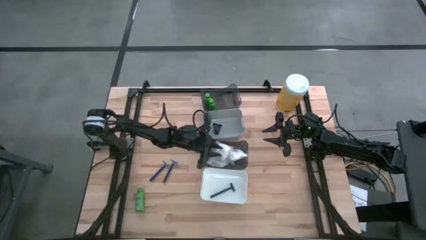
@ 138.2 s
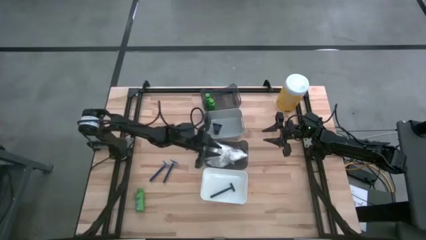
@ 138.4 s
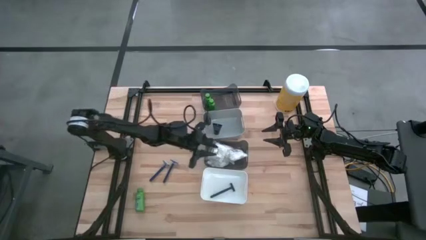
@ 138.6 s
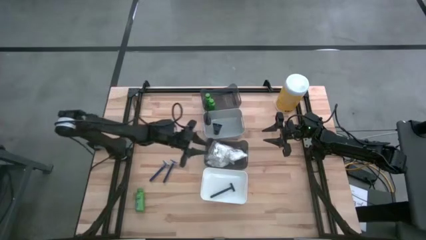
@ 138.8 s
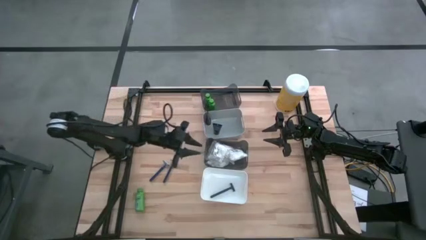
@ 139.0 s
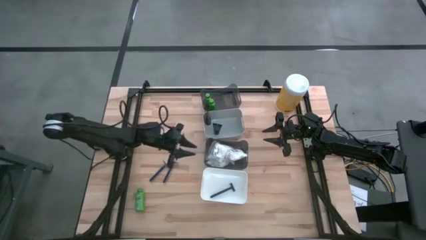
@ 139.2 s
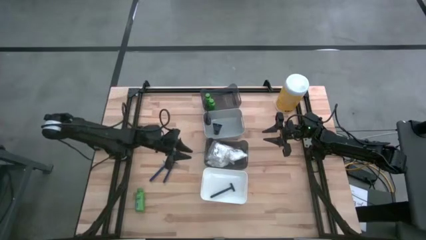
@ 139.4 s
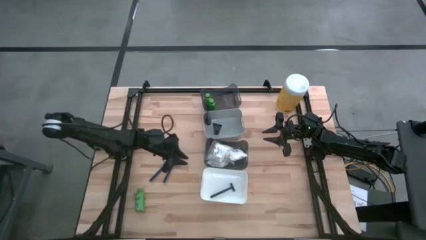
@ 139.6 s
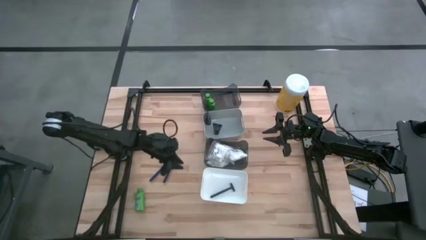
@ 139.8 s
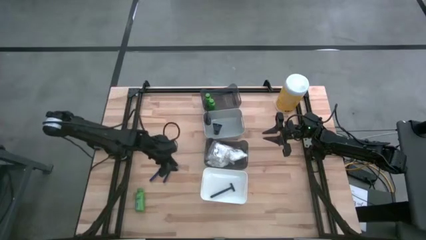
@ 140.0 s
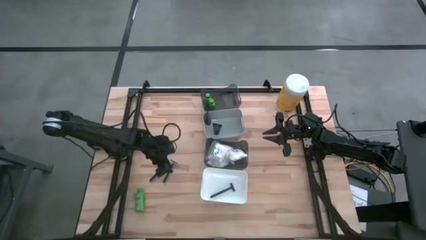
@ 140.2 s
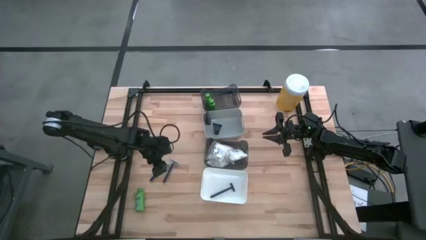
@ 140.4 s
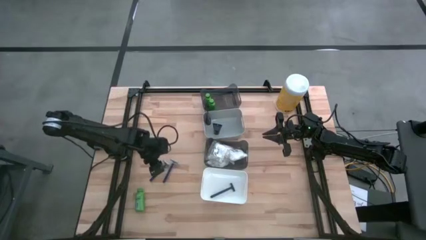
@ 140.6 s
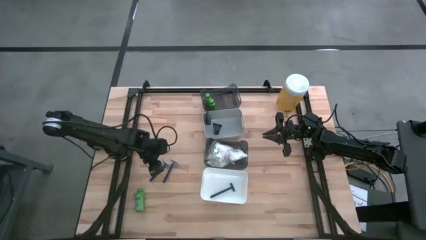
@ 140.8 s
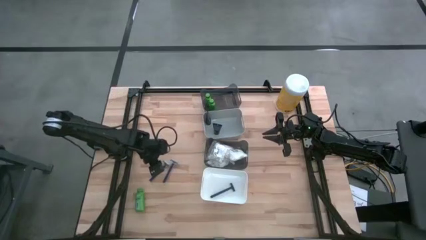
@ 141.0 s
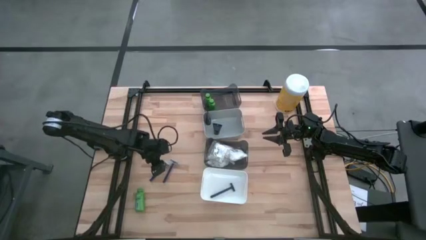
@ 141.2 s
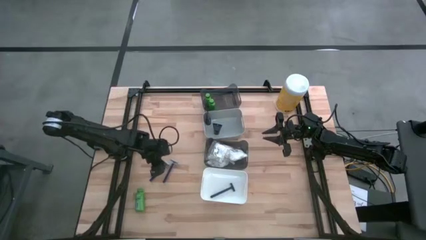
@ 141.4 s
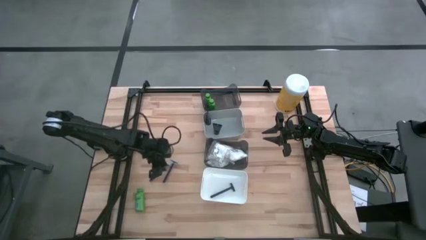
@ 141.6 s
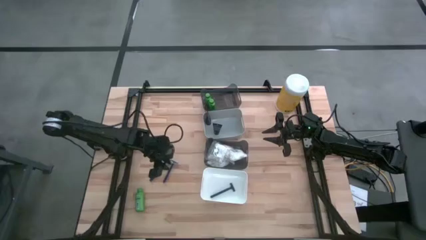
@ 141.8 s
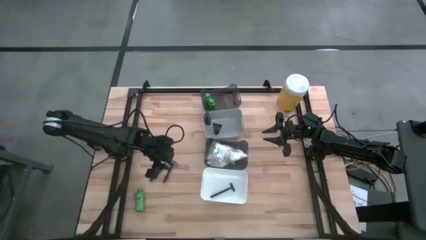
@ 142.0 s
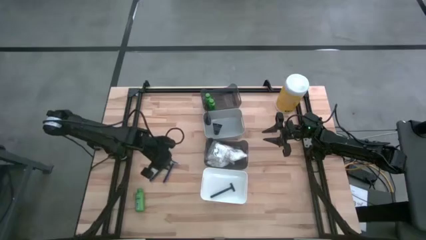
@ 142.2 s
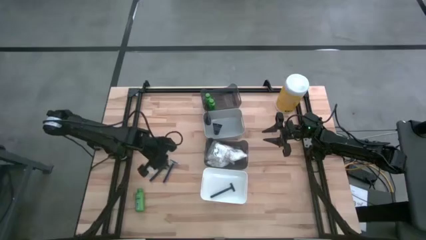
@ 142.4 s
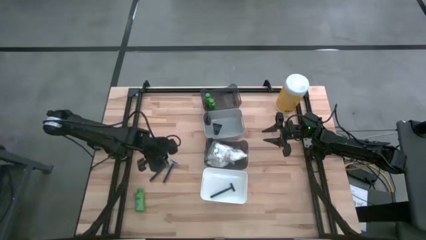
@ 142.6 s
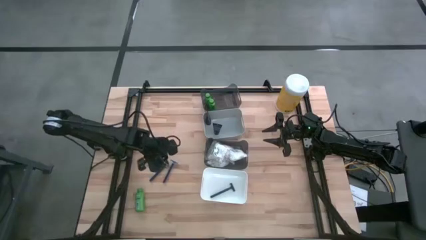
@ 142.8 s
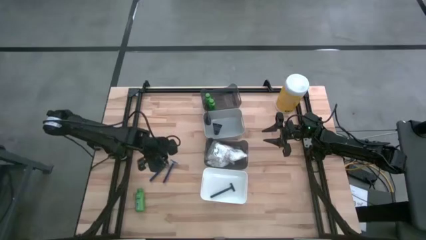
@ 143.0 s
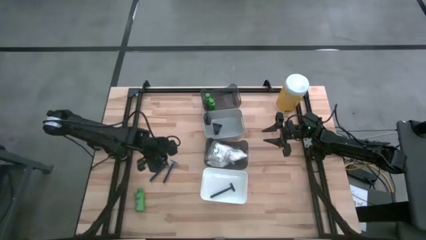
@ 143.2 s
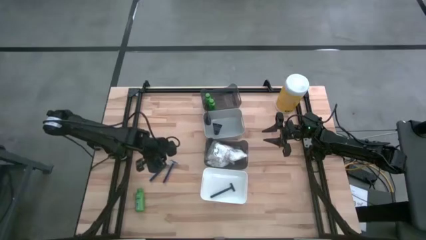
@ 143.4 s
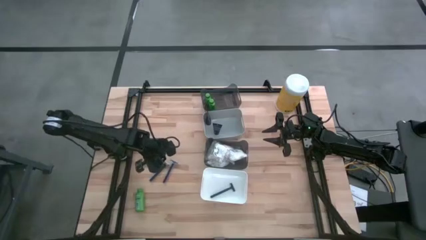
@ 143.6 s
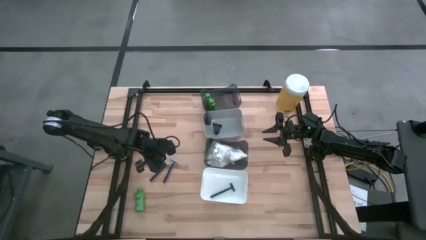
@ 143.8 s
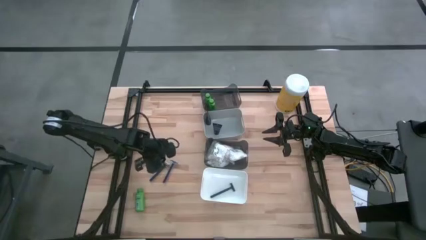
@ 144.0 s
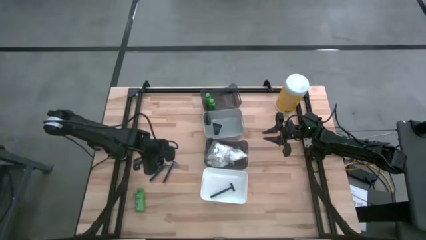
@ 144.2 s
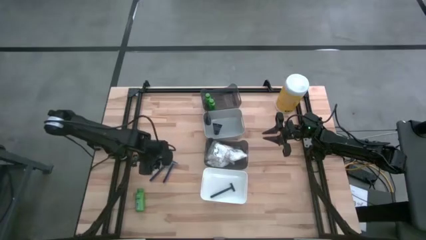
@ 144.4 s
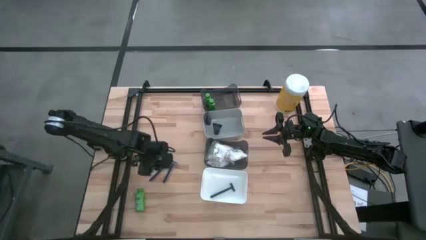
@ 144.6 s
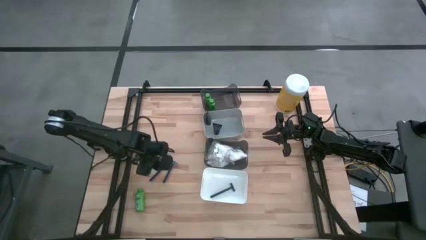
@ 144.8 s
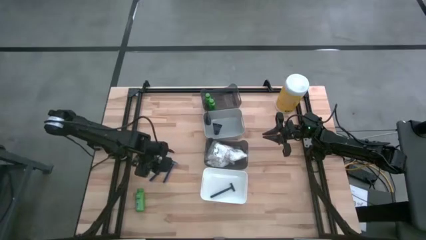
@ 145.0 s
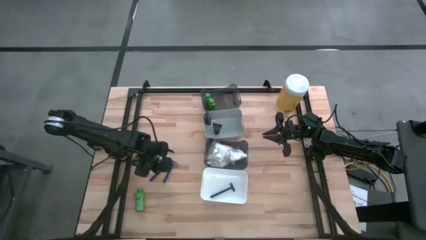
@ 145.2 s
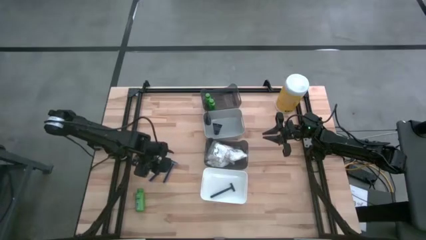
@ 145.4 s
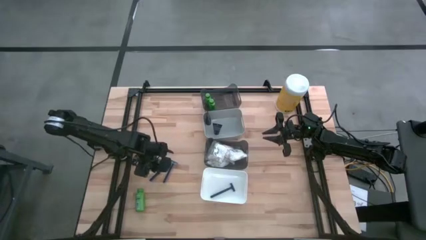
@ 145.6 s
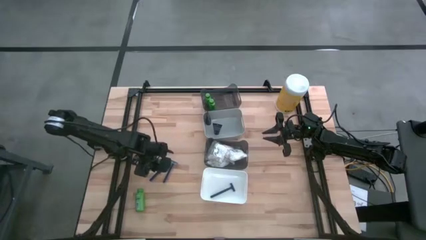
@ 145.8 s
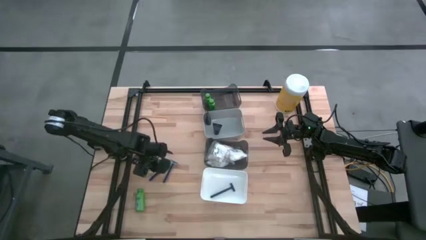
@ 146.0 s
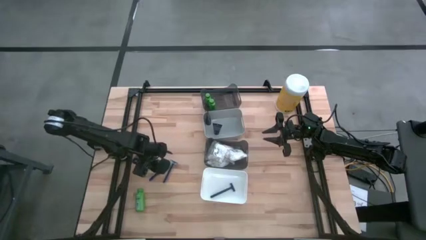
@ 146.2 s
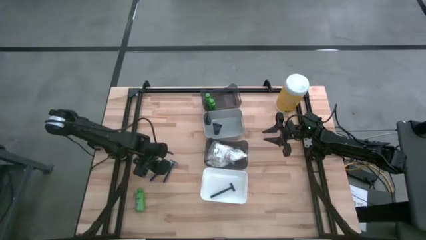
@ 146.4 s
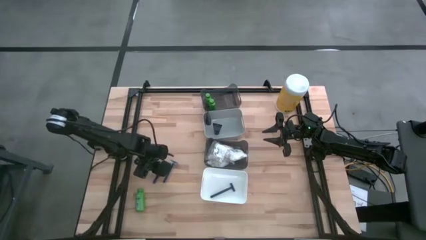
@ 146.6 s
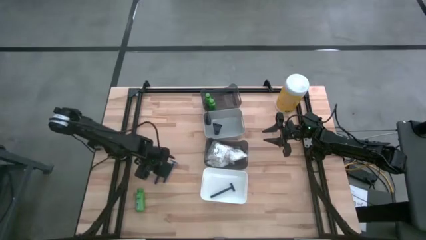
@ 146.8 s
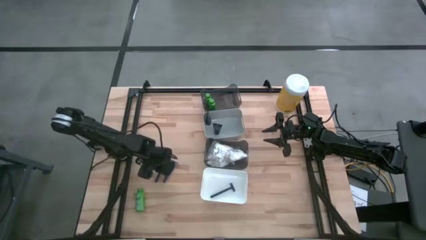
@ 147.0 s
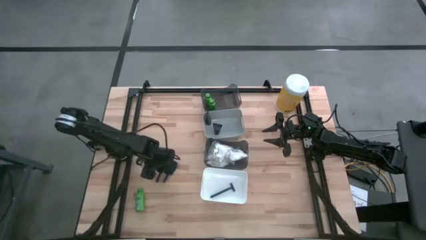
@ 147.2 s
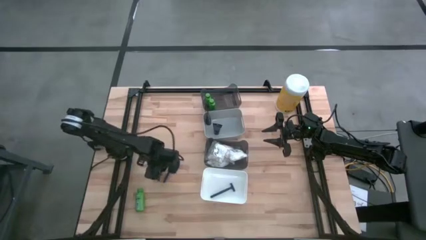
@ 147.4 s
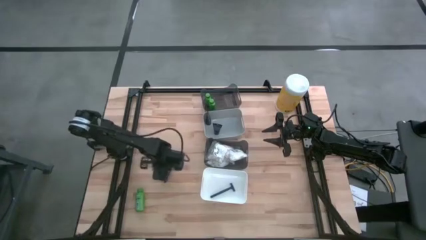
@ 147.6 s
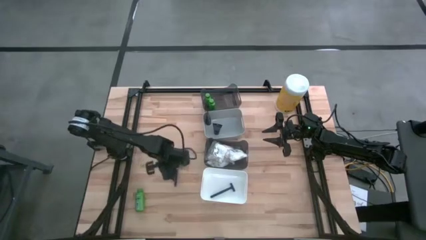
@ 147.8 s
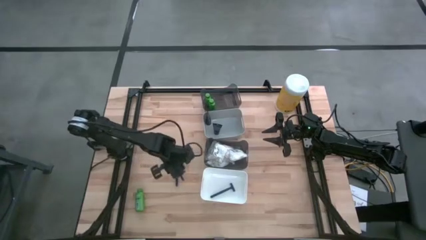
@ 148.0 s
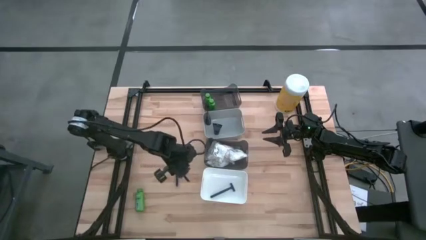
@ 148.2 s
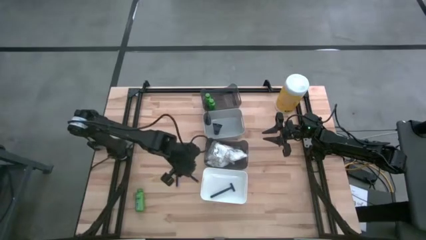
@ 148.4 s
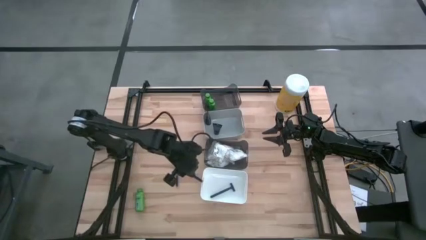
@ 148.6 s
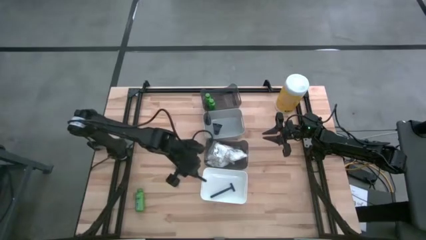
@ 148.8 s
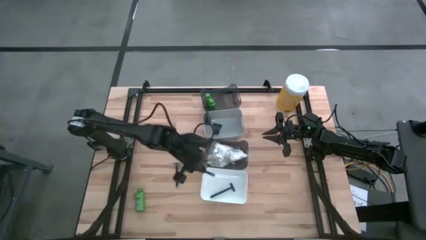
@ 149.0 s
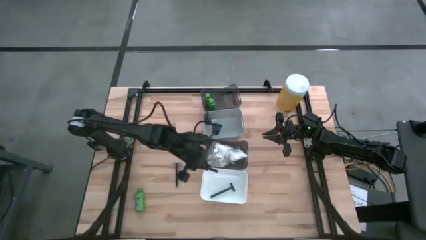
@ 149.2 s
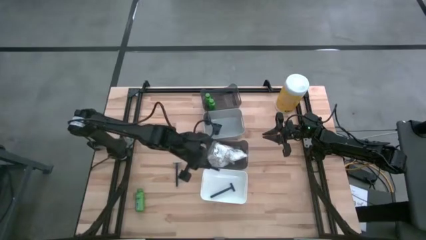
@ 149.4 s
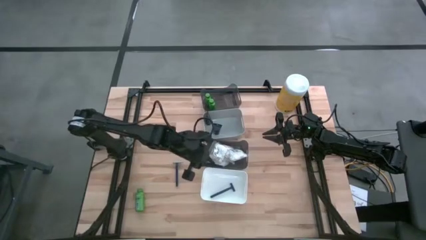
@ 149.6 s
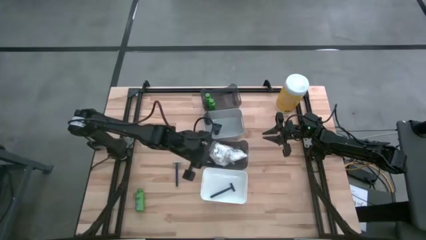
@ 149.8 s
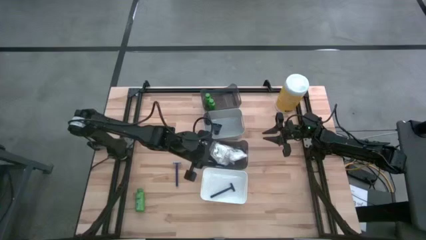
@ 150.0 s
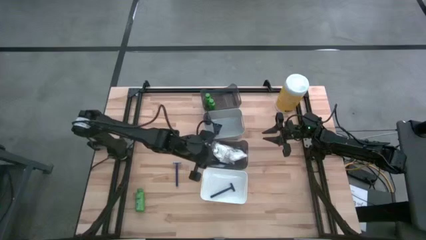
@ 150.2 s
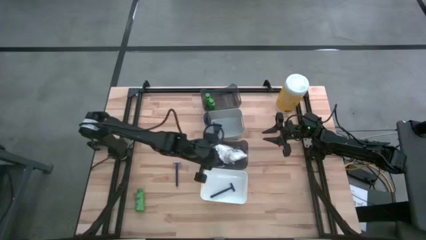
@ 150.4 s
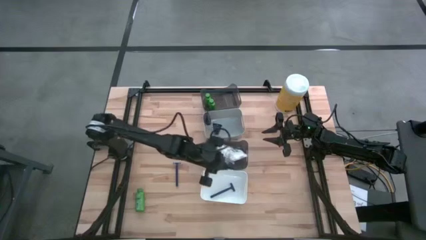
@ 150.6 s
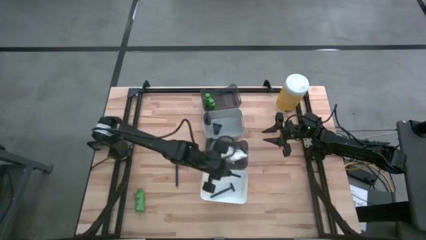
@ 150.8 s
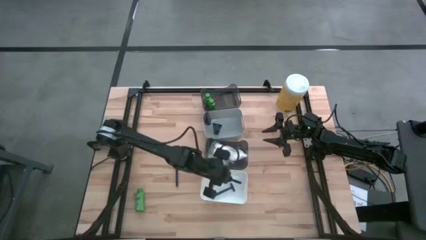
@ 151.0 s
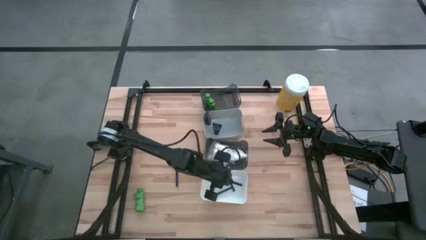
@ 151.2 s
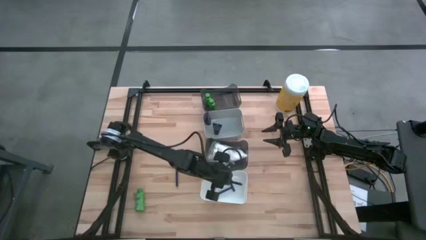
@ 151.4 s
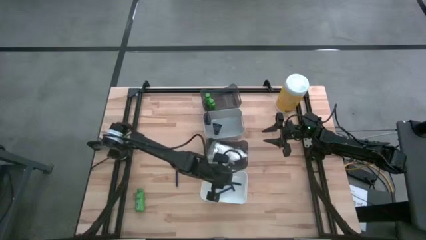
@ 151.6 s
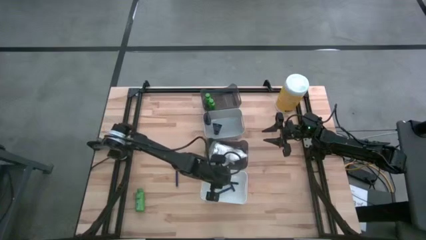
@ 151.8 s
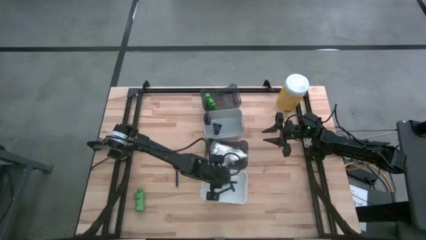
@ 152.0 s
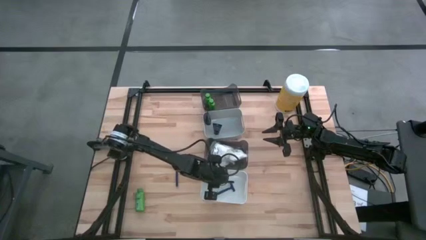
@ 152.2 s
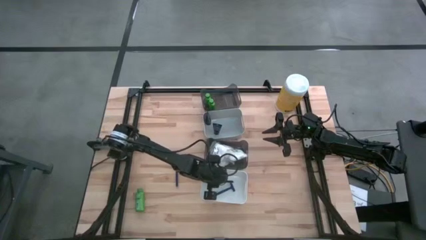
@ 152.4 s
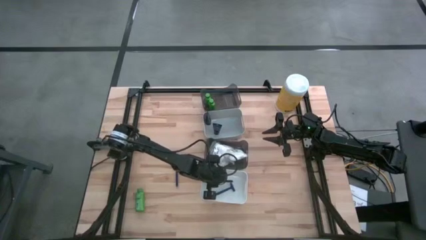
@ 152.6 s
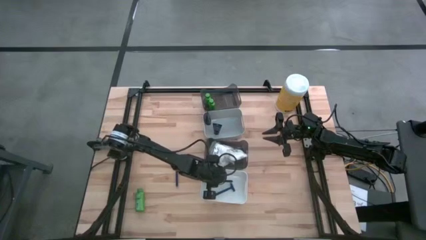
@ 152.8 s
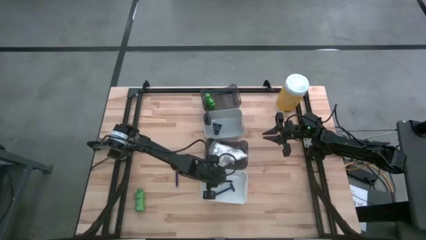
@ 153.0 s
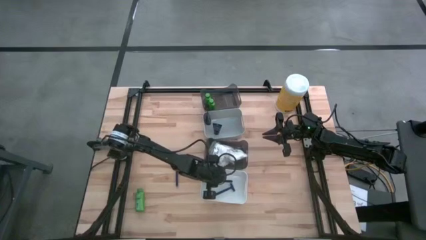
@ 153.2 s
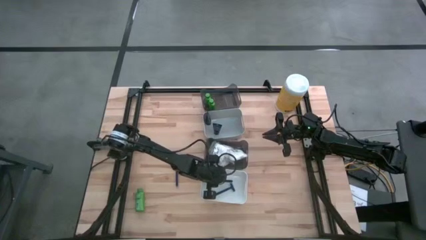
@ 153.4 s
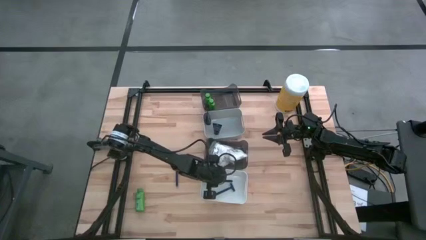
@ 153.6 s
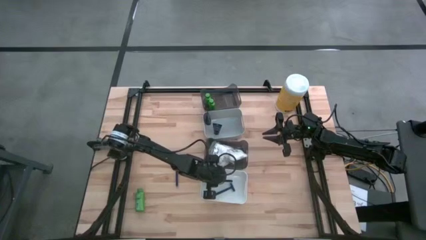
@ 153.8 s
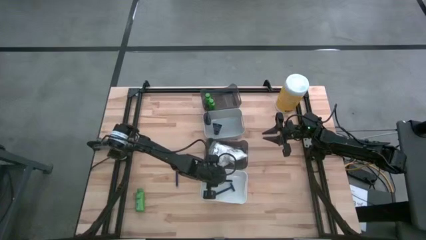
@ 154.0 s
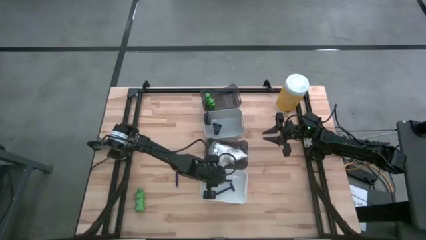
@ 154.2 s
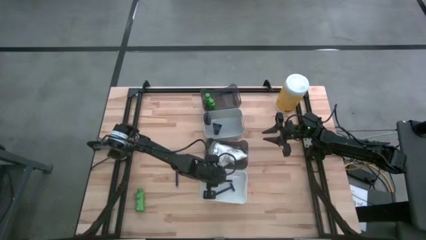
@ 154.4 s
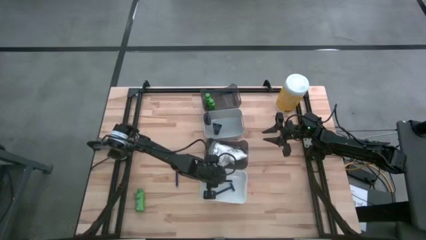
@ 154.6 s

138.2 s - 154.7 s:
Task: Pick & Place Travel size toiletries
Put the left blue razor into the white bin

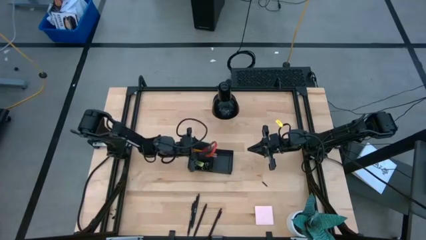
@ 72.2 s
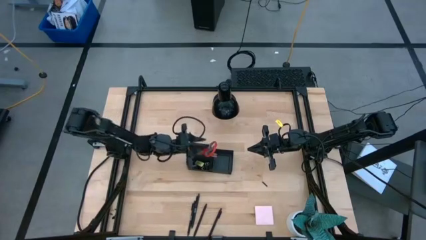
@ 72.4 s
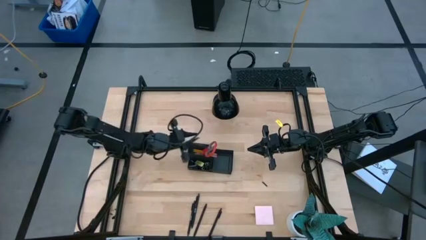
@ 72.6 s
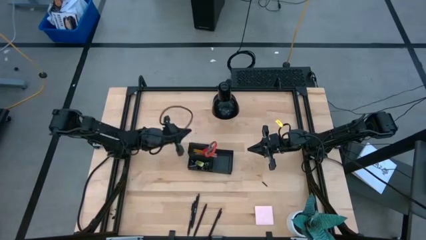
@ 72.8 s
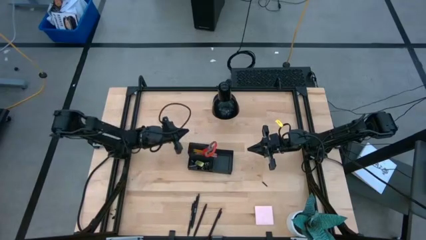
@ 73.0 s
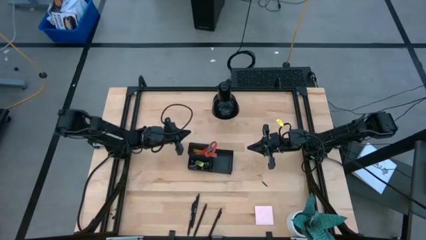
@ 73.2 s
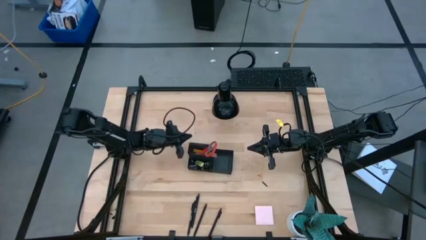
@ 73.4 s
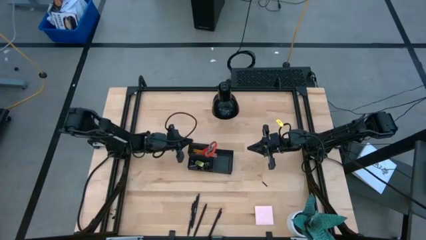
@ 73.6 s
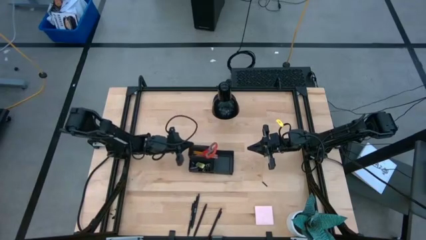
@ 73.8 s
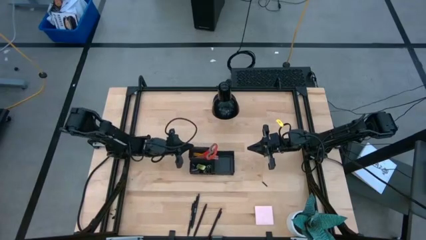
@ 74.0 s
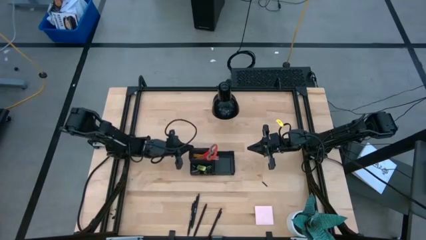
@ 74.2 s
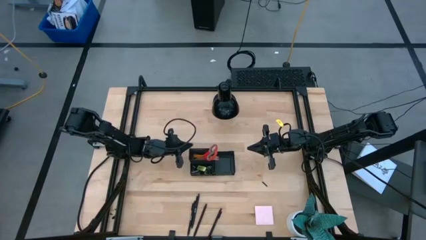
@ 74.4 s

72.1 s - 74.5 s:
Task: Pick and place office supplies into organizer
Adjust the desk organizer
